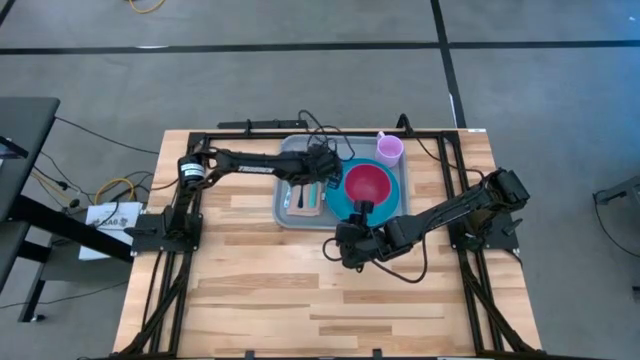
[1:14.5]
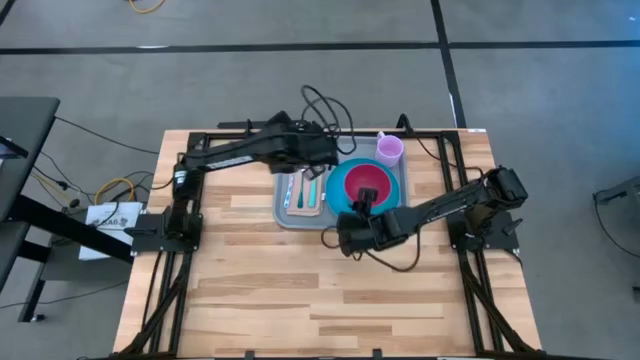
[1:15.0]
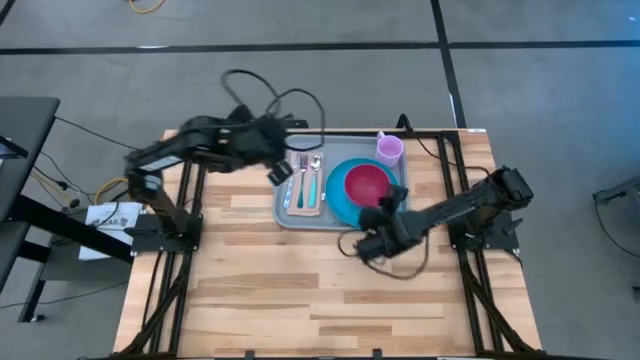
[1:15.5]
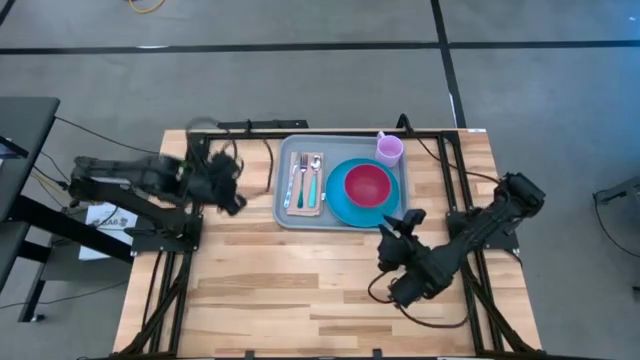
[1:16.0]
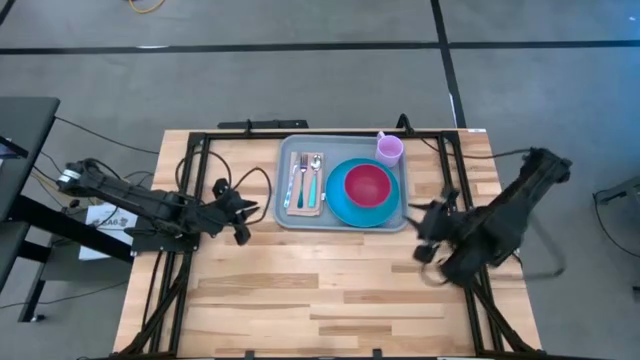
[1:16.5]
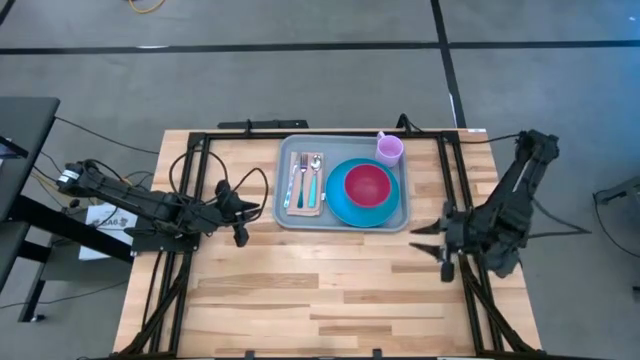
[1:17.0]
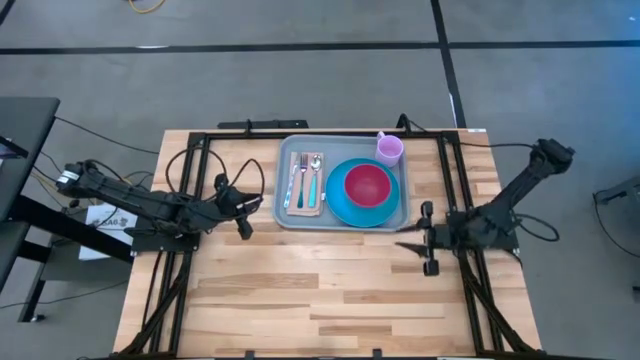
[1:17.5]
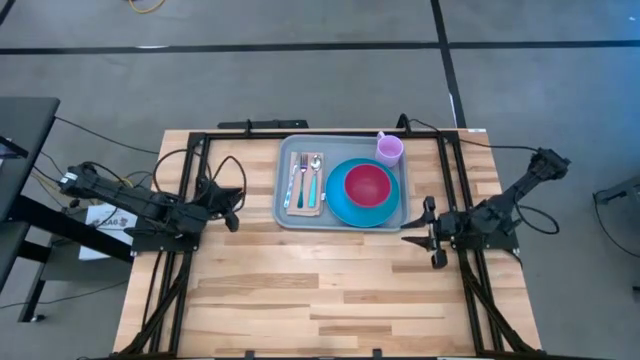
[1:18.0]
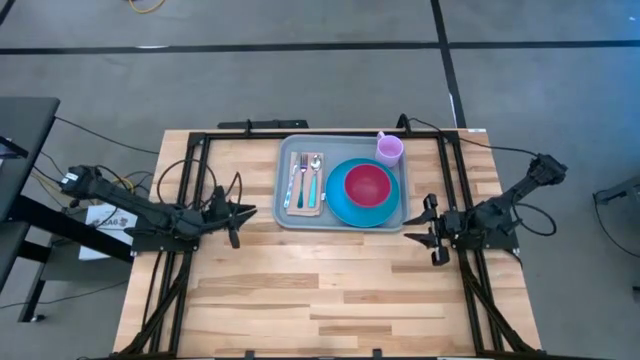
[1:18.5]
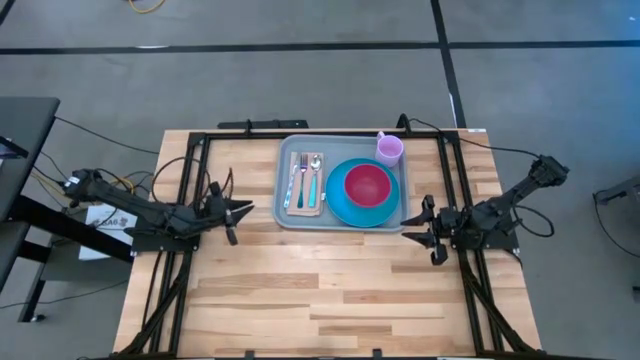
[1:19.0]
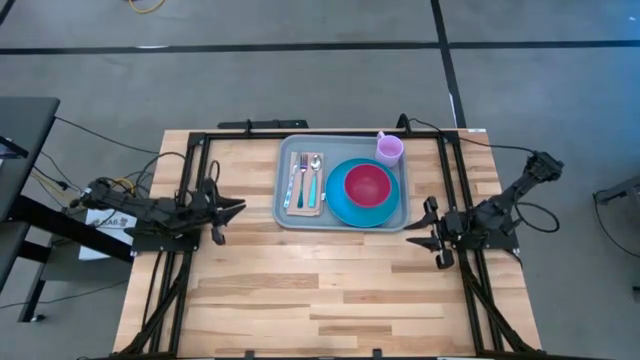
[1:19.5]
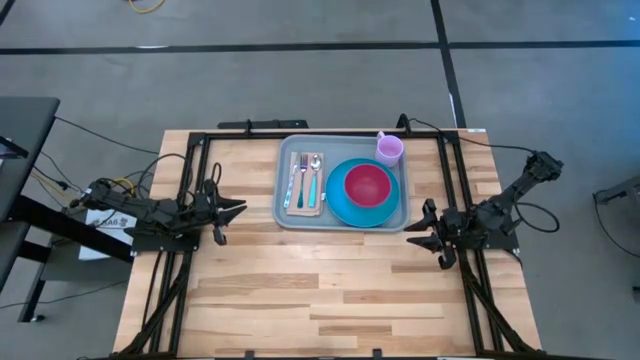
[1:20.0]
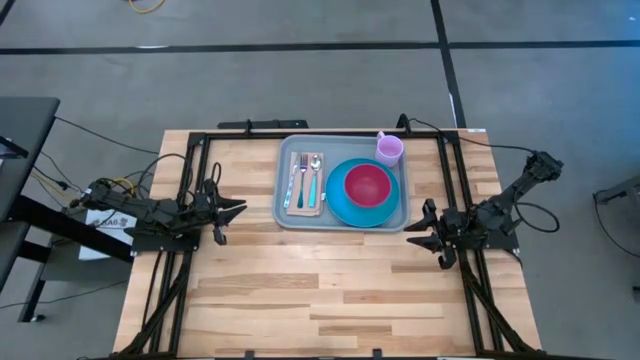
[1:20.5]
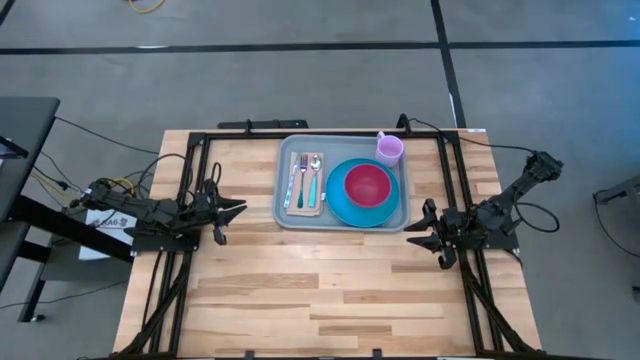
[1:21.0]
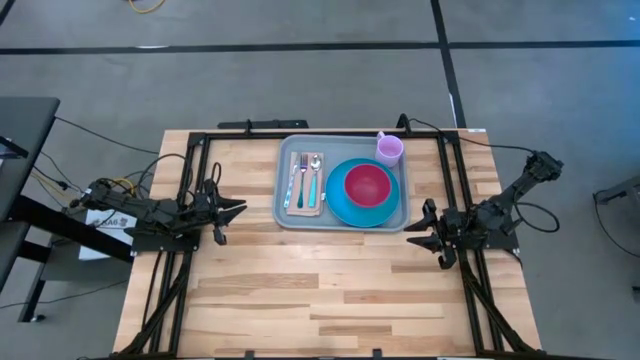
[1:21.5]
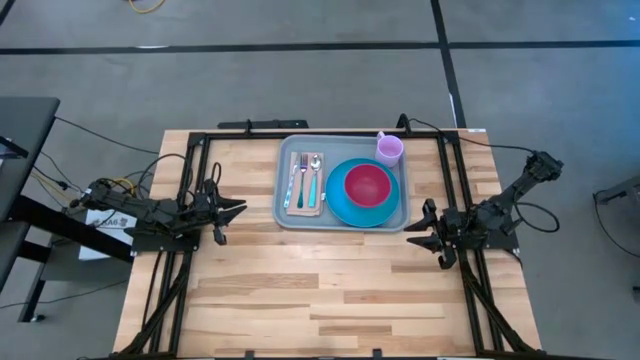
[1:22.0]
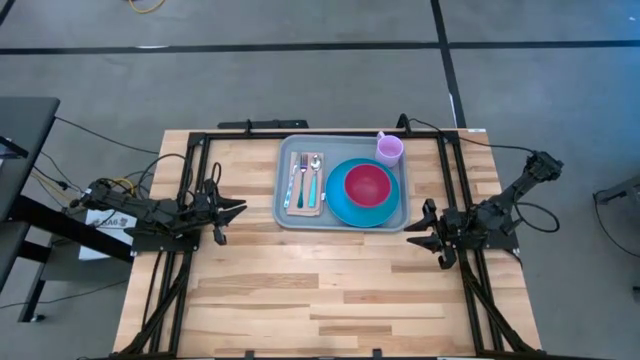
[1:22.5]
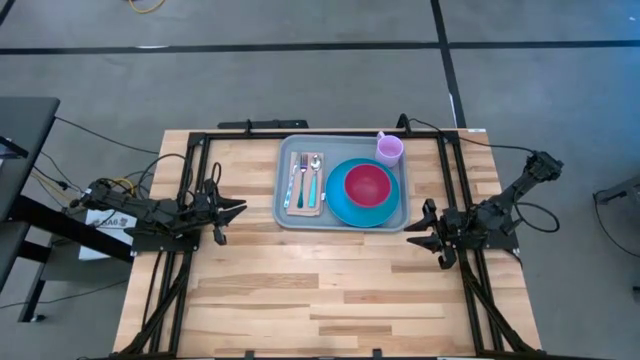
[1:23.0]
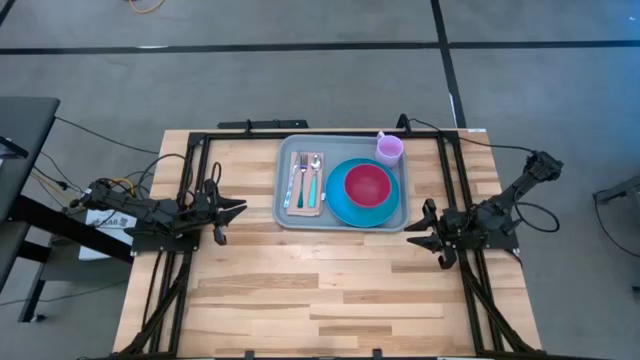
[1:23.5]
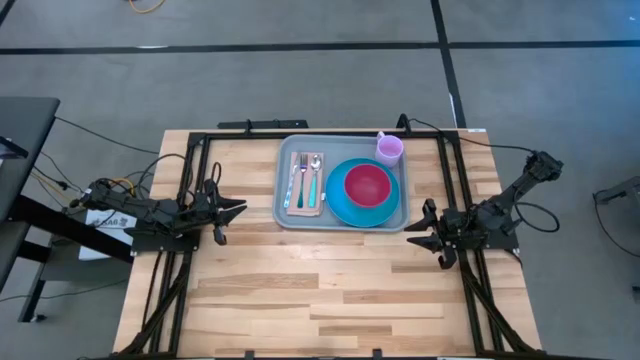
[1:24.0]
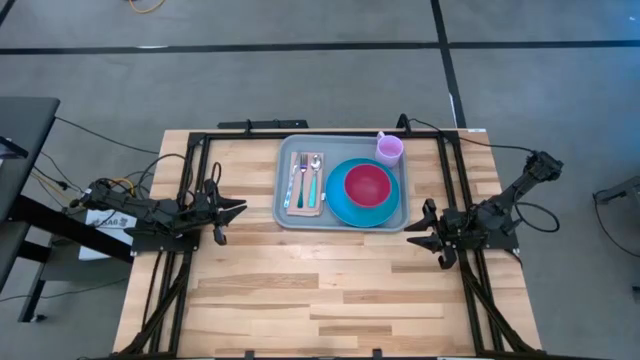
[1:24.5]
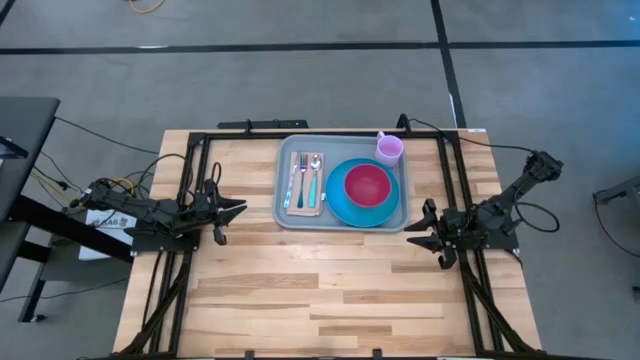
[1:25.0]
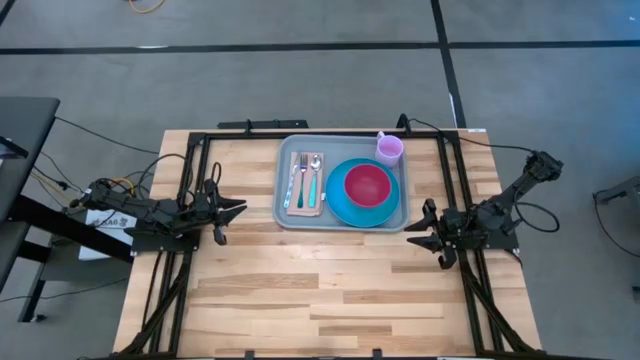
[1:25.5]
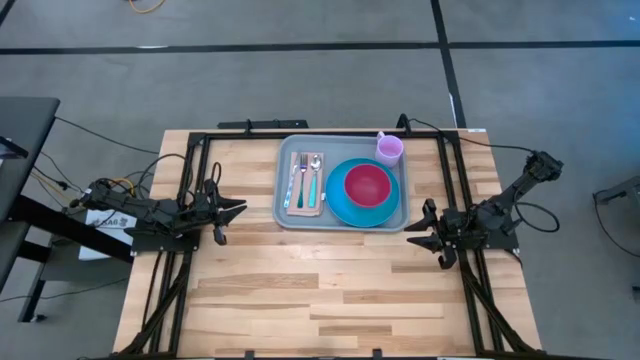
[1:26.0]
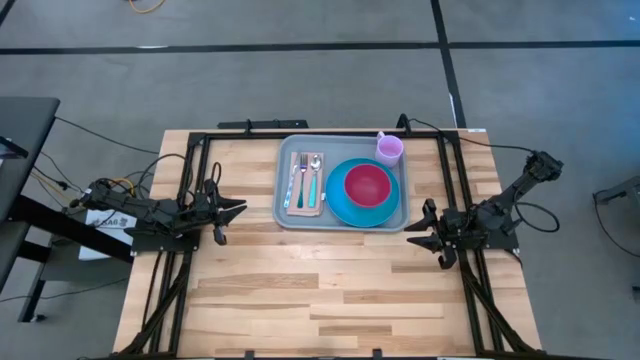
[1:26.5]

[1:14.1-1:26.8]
Task: Set up tray
Return to Home Position

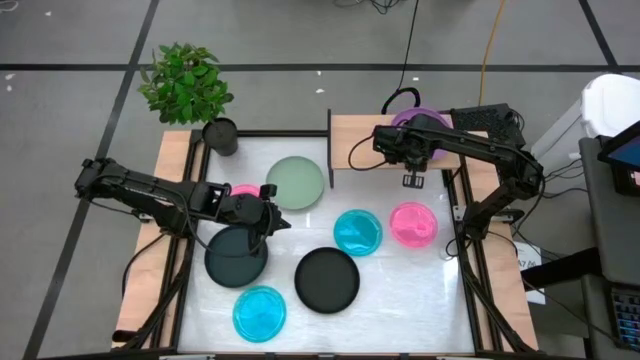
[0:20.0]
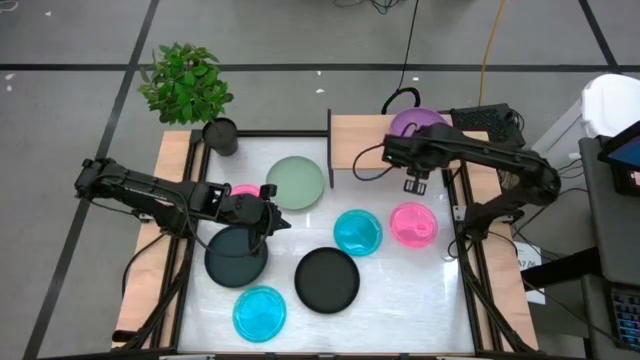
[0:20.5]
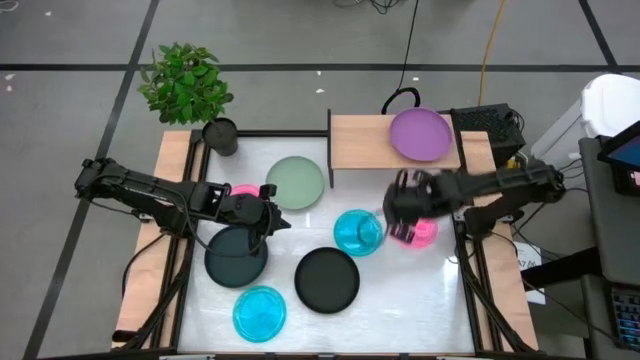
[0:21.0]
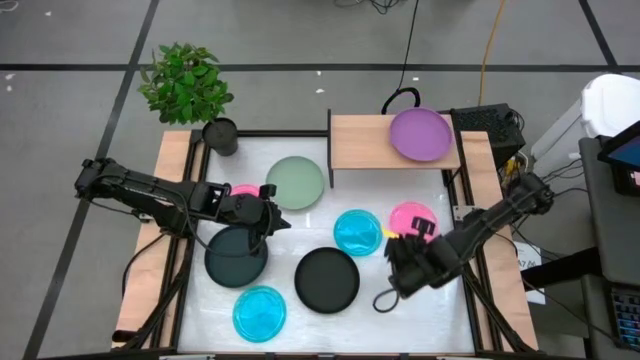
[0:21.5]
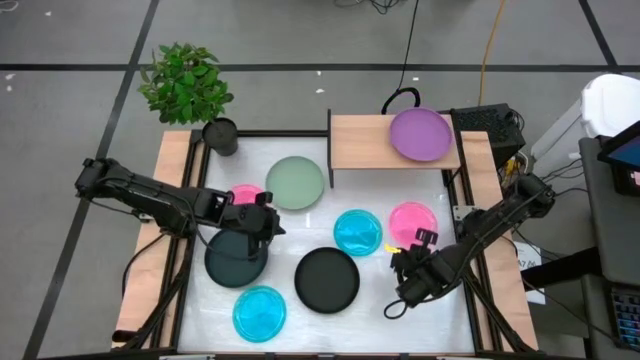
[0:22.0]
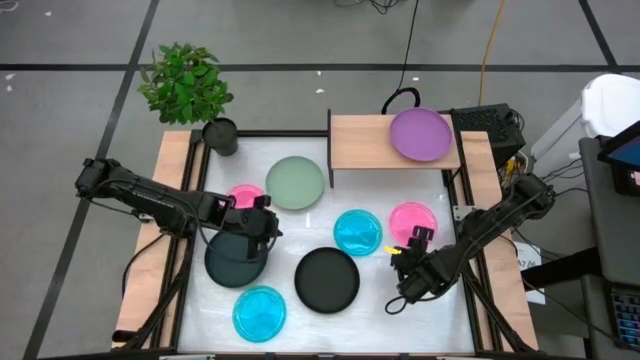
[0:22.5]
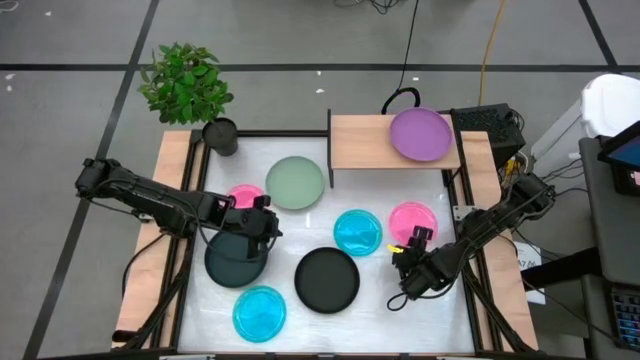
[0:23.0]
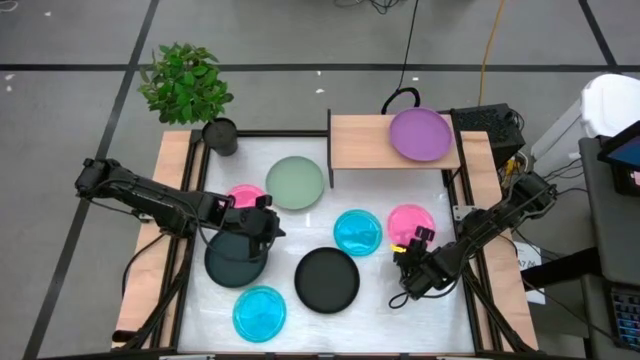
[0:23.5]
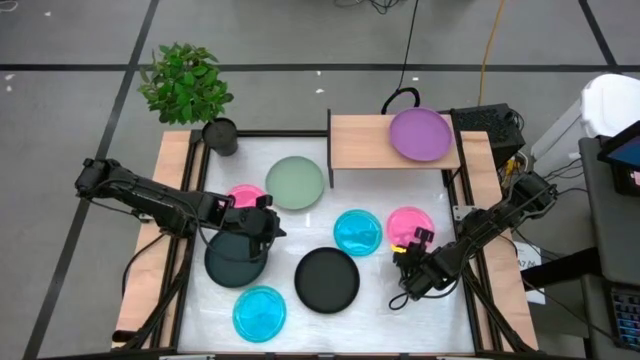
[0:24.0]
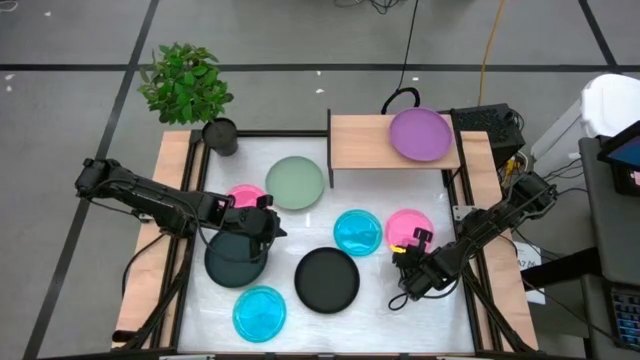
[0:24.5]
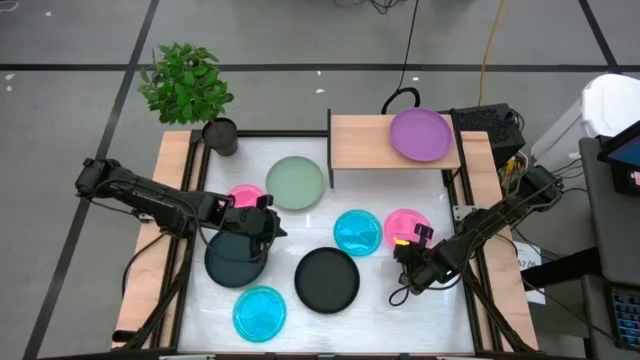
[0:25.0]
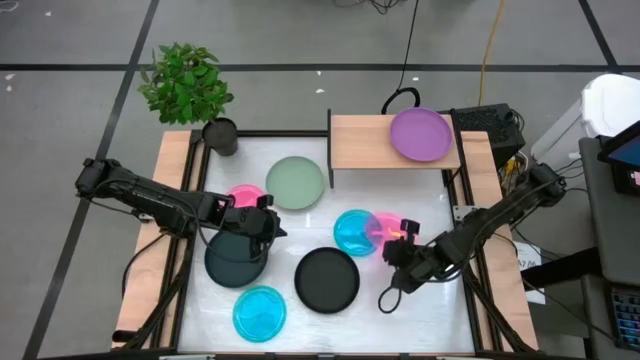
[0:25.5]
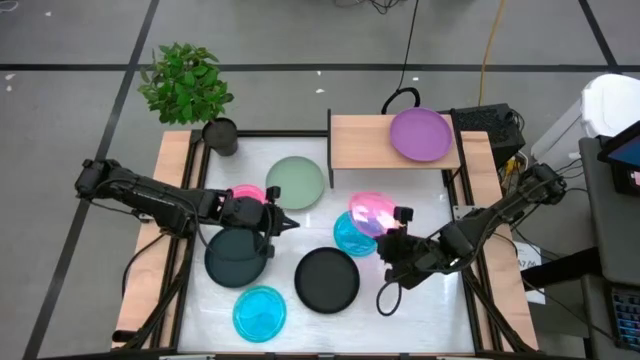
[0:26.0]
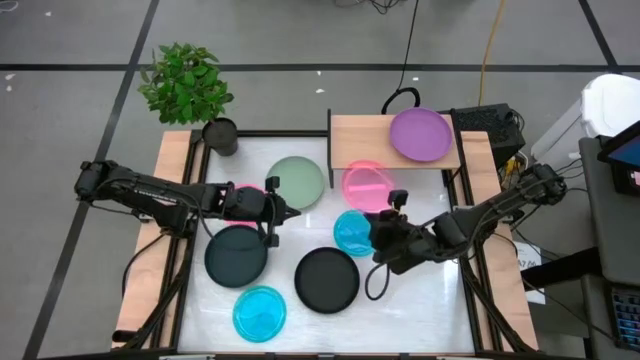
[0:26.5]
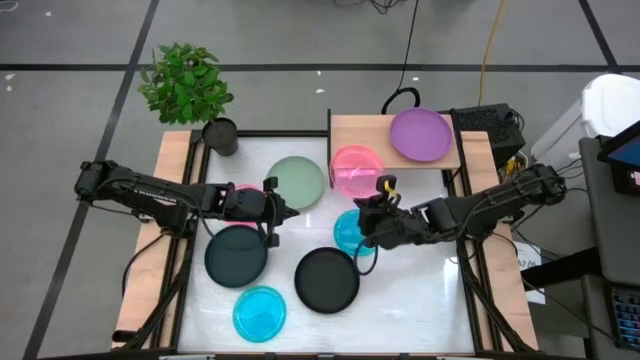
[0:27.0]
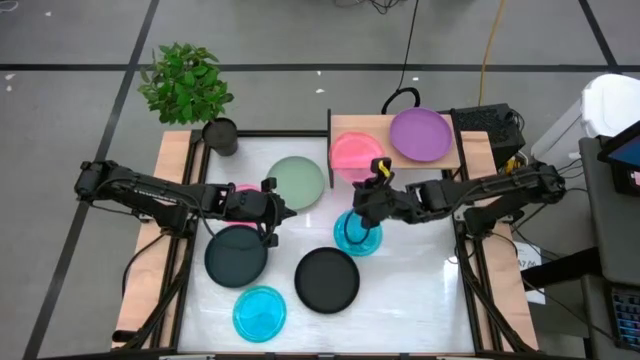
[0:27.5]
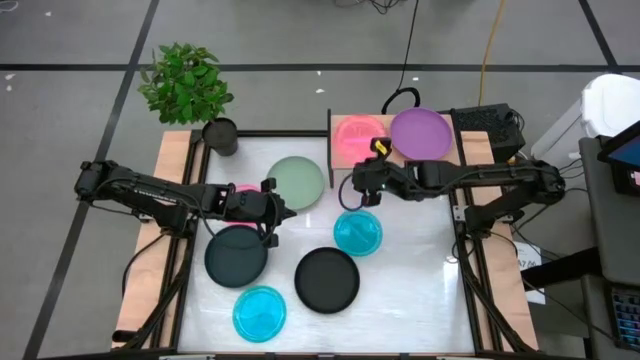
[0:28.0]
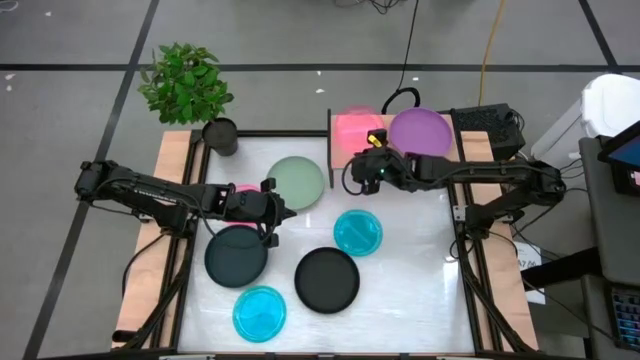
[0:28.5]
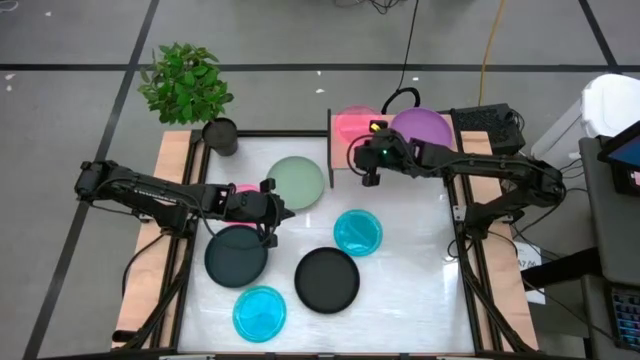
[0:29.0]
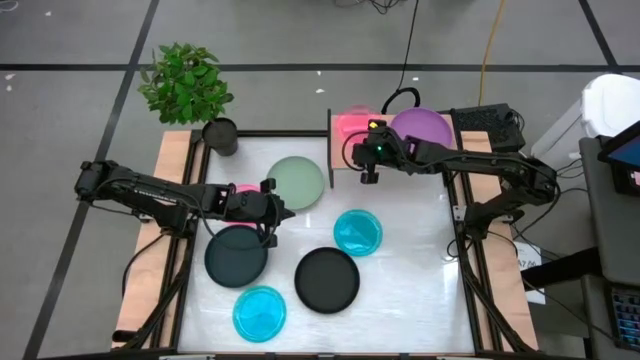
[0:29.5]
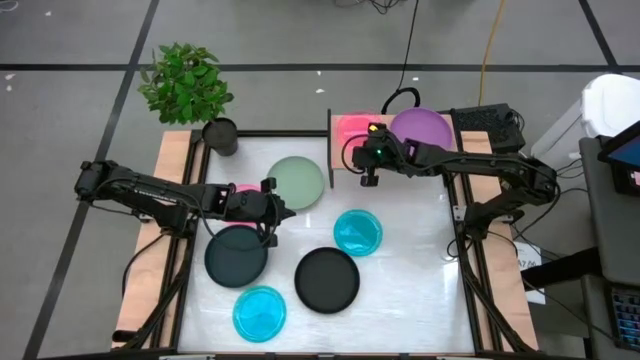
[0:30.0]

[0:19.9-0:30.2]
Task: Place and stack plates onto a shelf
Put the bottom pink plate on the shelf
